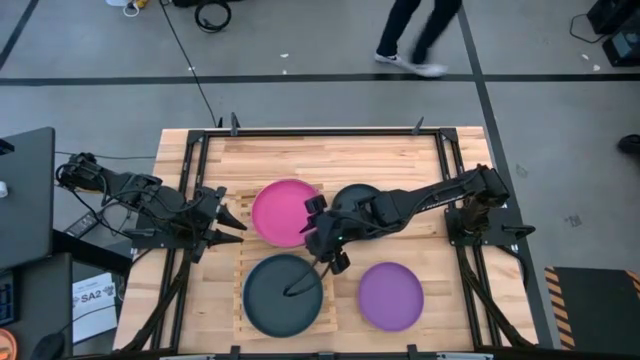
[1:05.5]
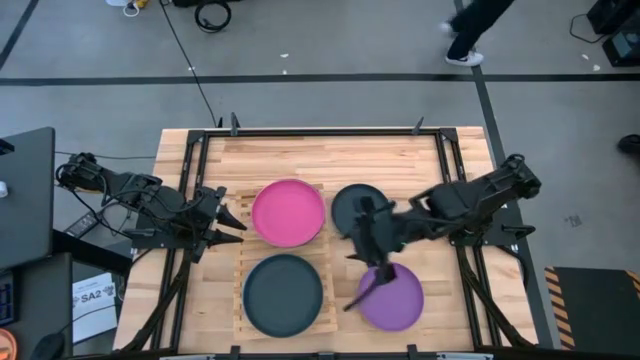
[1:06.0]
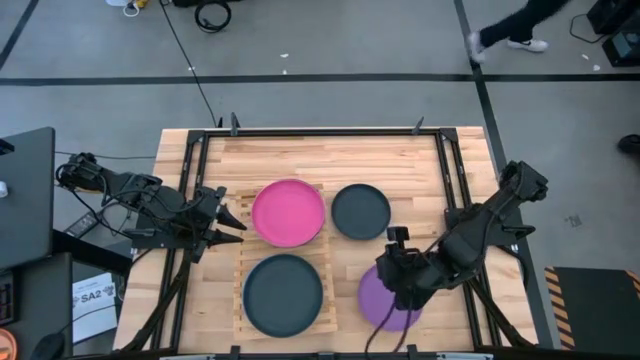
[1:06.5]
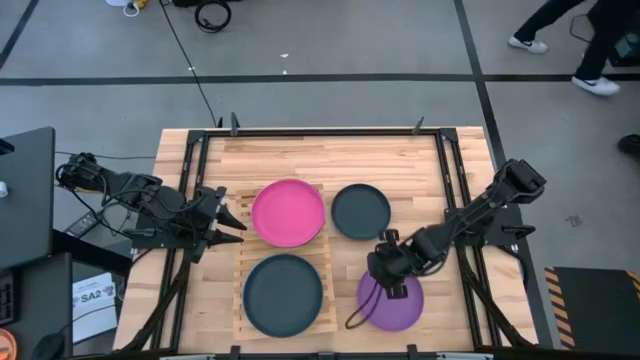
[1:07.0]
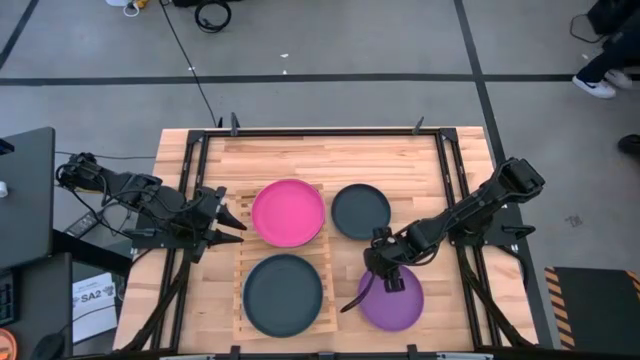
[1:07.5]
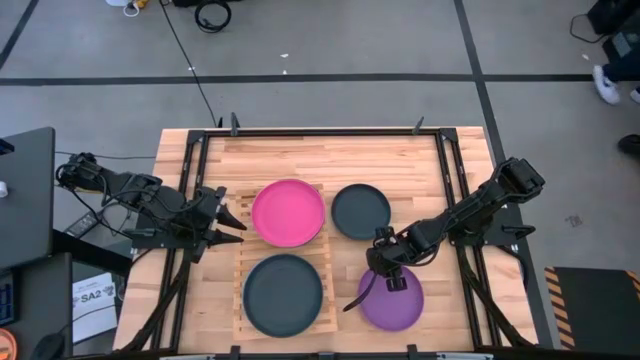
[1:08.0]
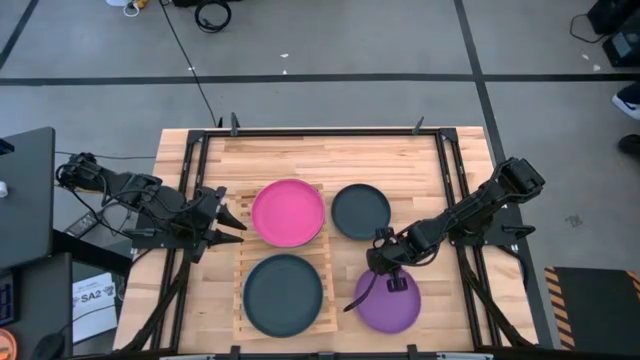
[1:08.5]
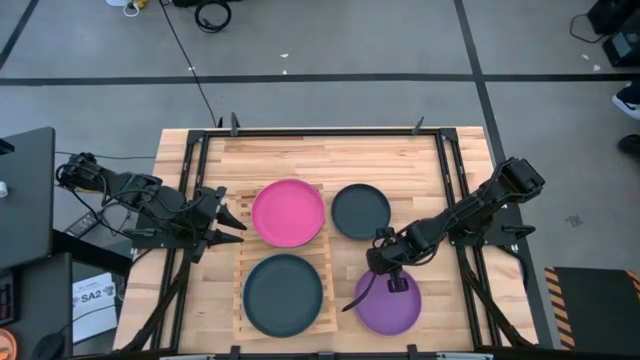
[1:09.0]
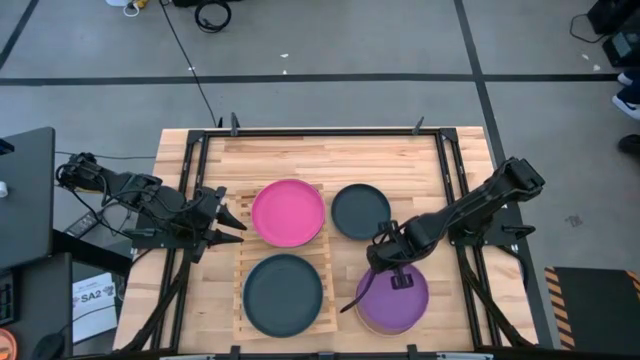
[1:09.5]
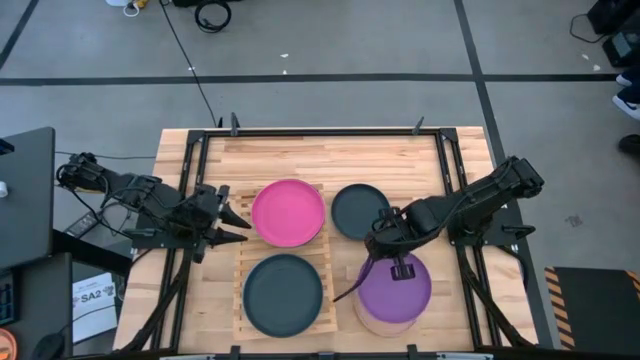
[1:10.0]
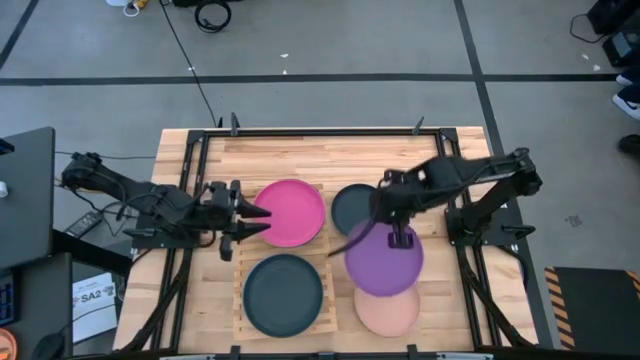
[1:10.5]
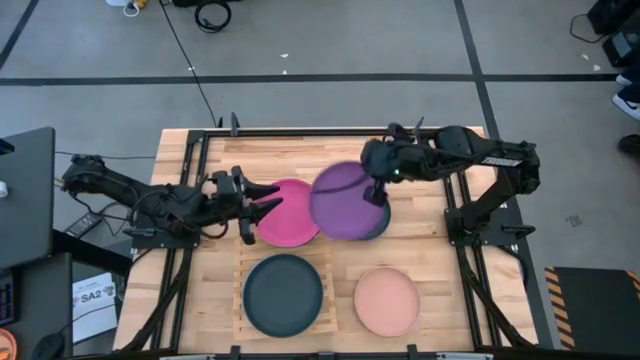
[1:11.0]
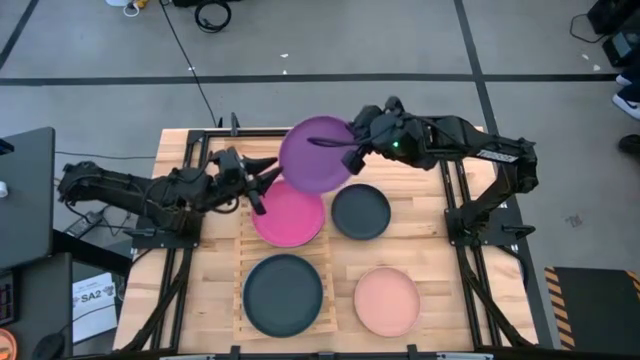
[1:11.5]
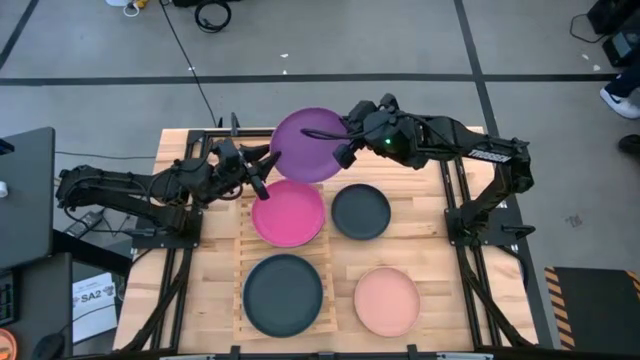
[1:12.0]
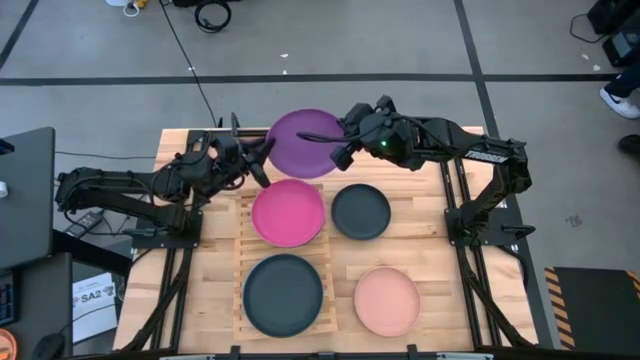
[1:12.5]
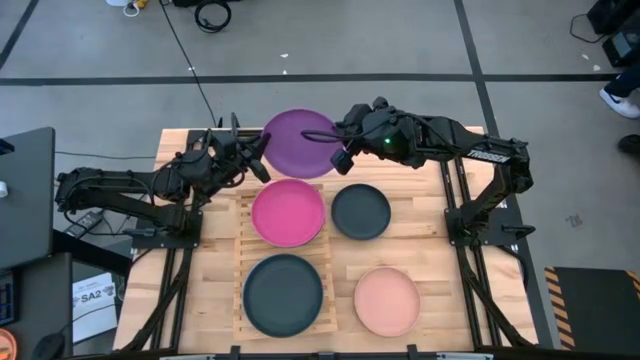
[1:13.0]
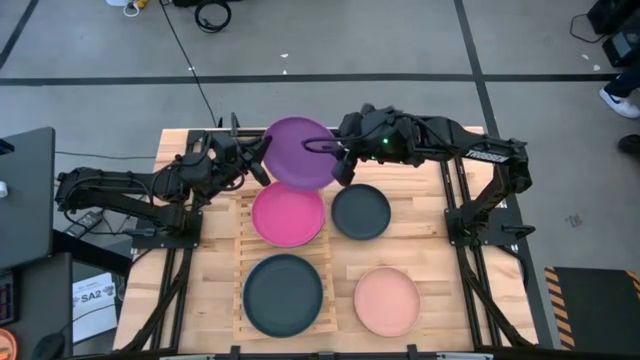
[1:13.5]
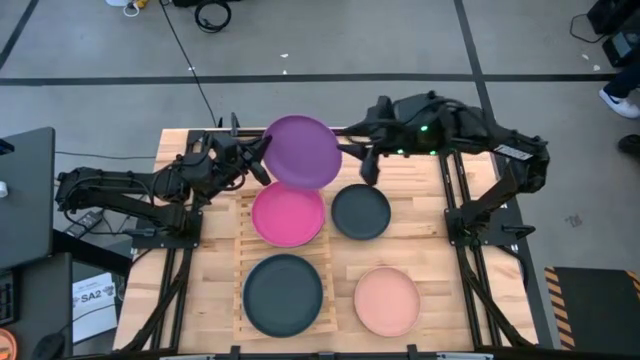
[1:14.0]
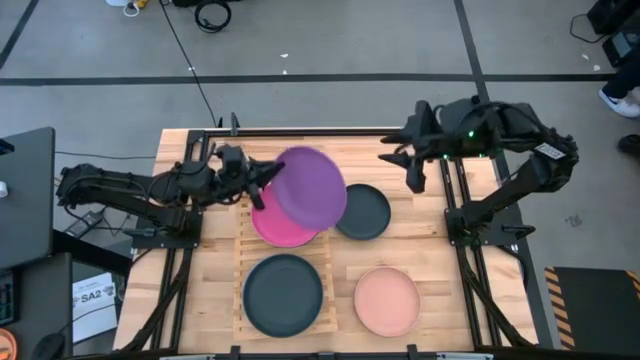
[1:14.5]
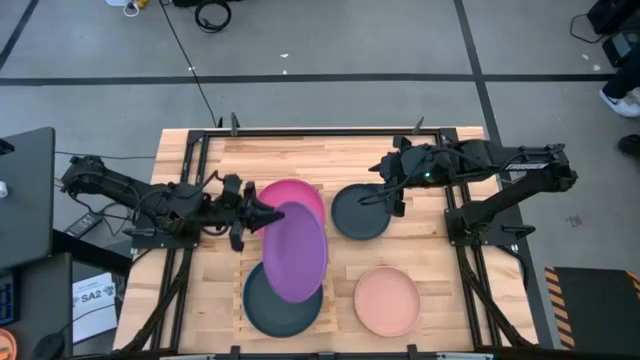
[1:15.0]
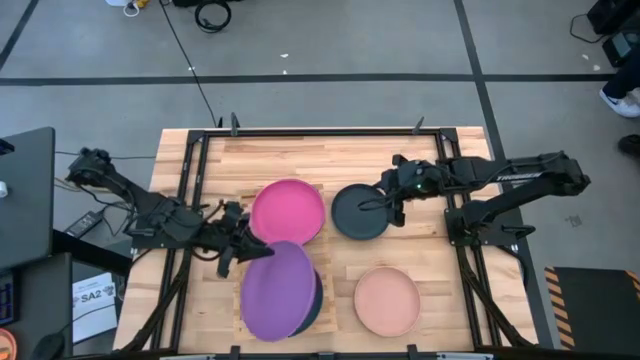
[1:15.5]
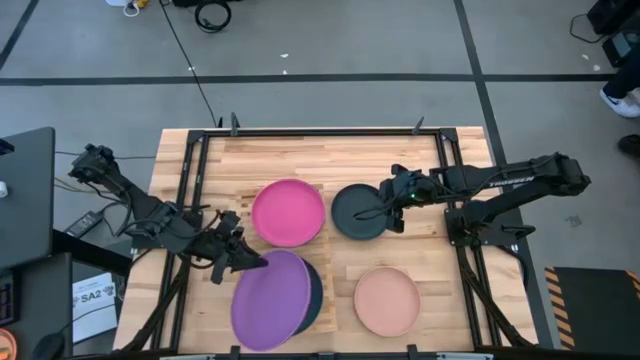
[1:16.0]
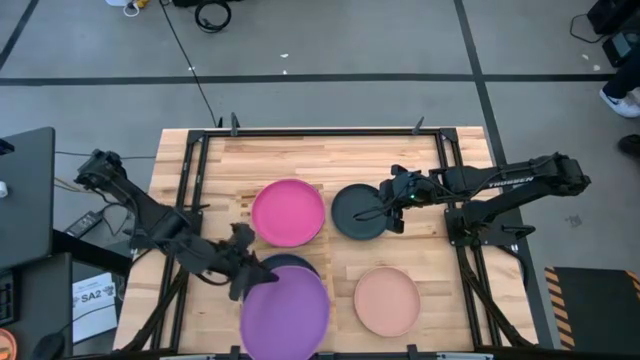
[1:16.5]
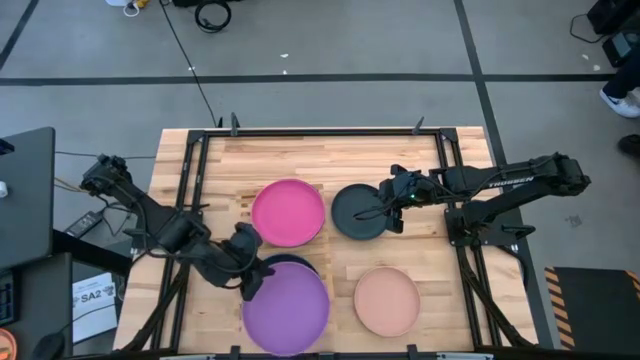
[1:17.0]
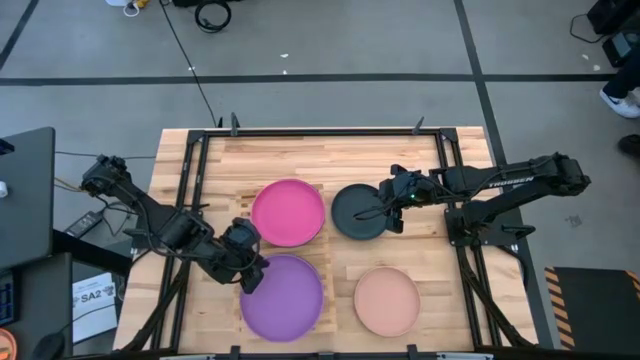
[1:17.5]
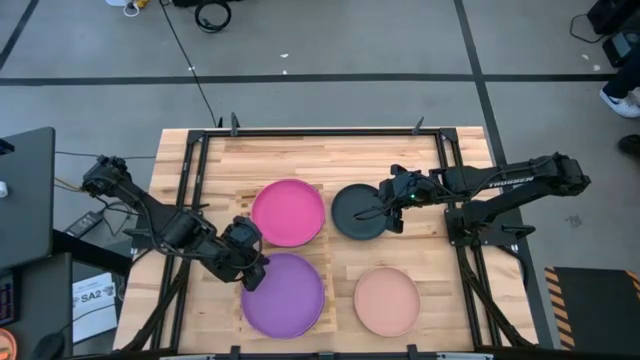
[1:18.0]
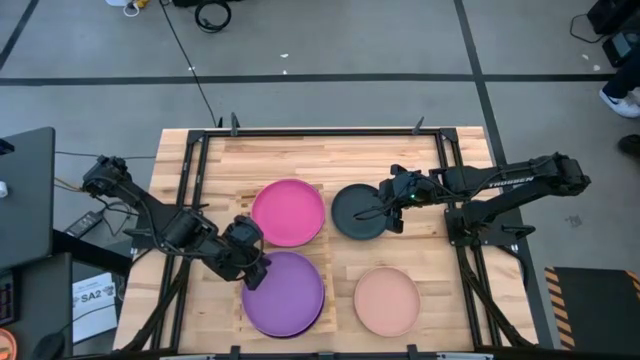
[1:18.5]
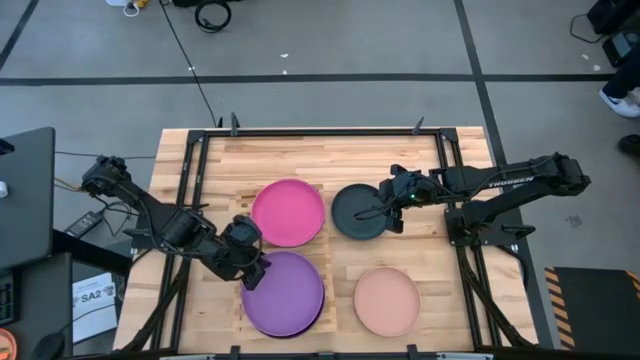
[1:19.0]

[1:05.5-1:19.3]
Task: Place and stack plates onto a shelf
Stack the violet plate on top of the black plate on the shelf

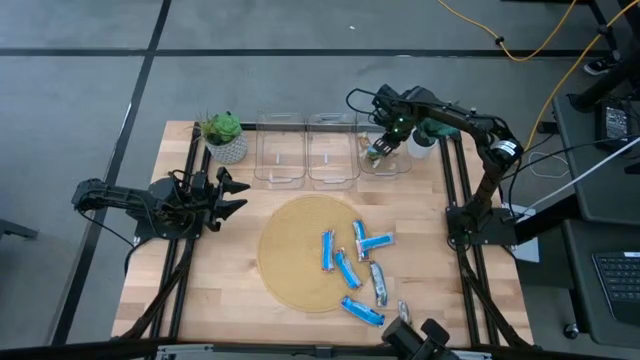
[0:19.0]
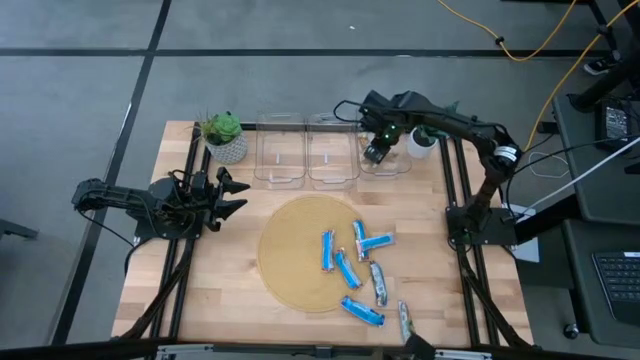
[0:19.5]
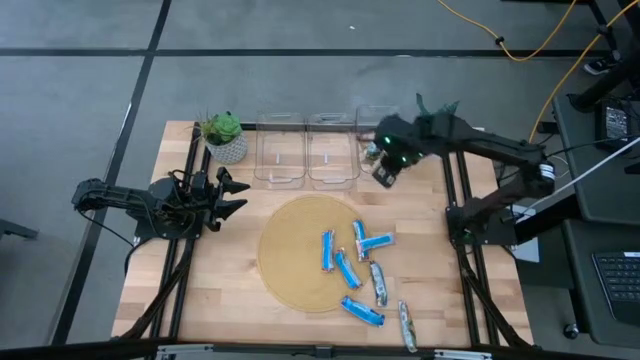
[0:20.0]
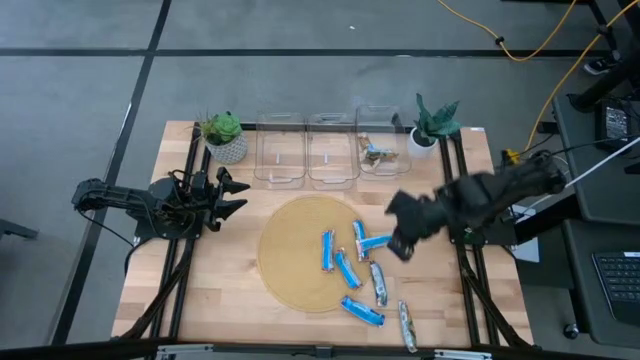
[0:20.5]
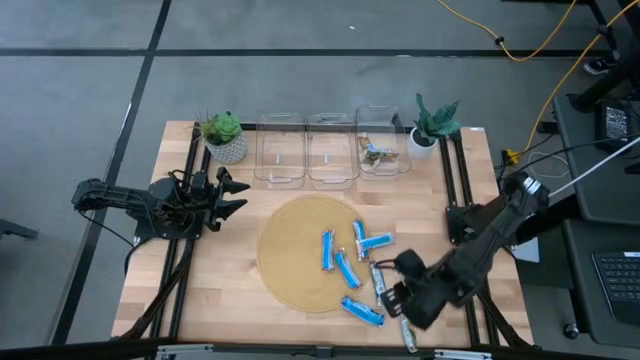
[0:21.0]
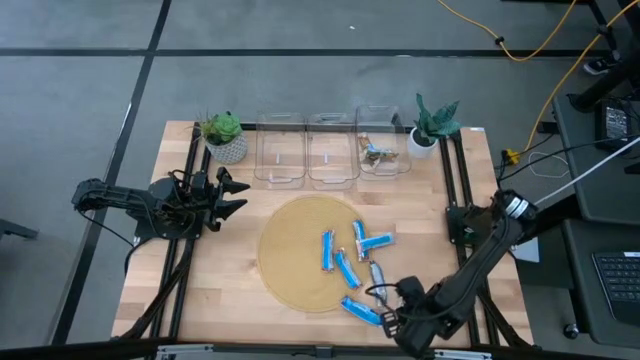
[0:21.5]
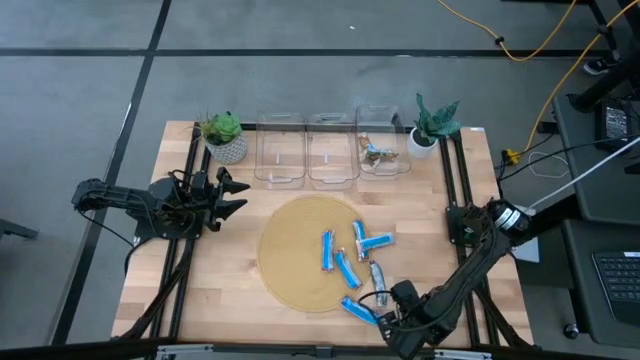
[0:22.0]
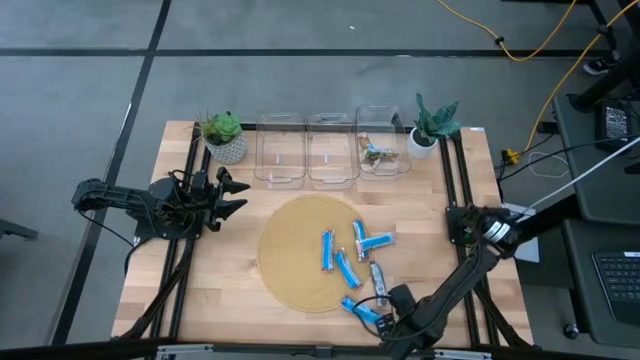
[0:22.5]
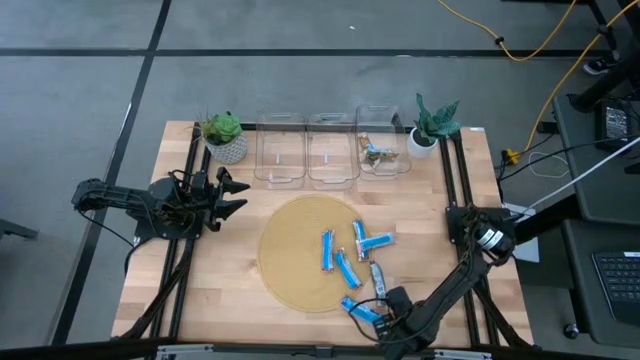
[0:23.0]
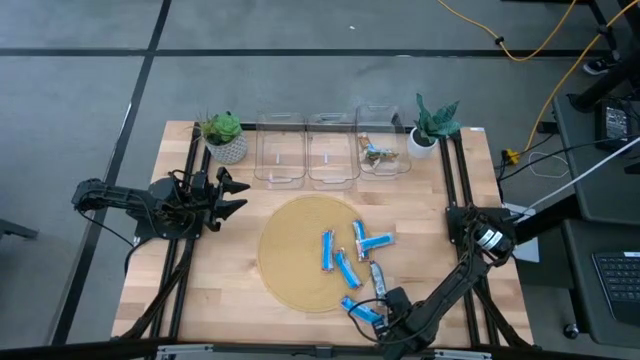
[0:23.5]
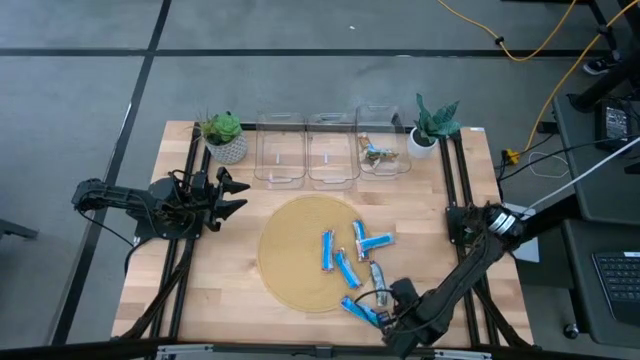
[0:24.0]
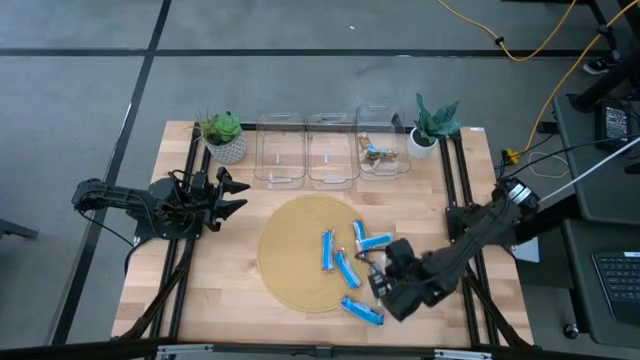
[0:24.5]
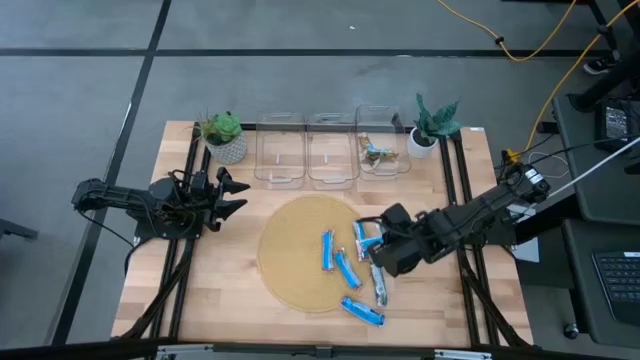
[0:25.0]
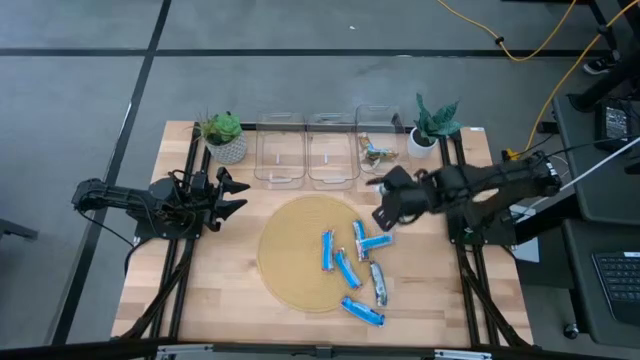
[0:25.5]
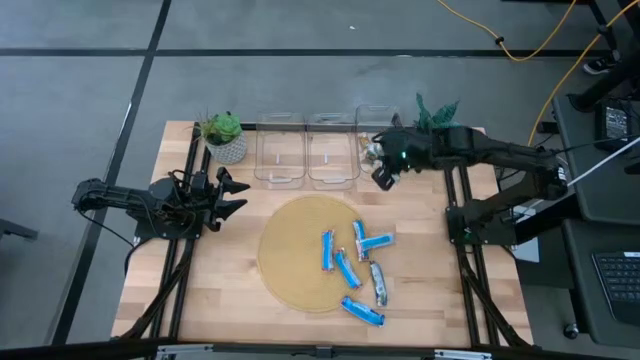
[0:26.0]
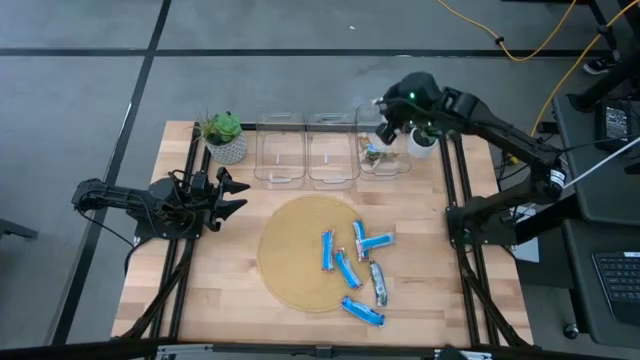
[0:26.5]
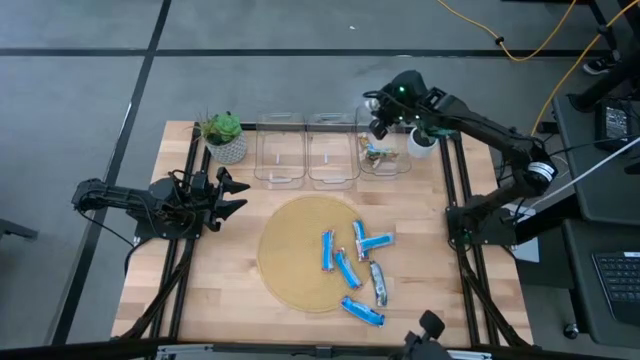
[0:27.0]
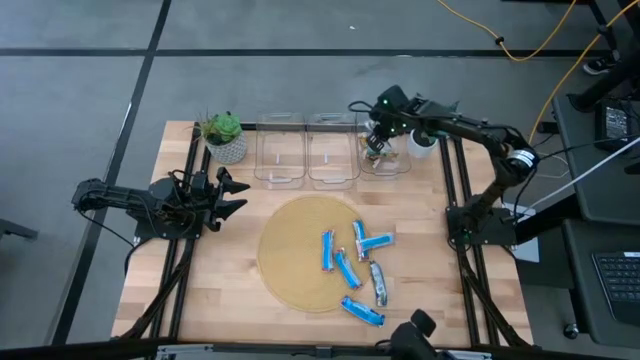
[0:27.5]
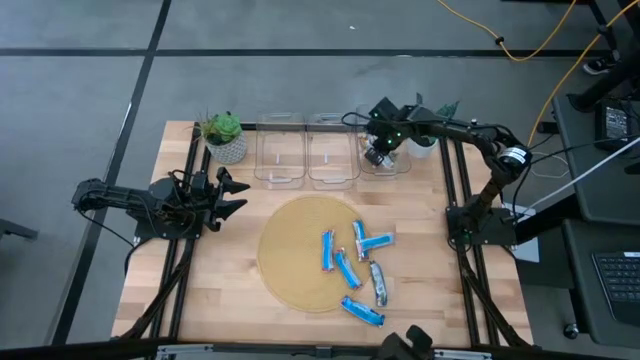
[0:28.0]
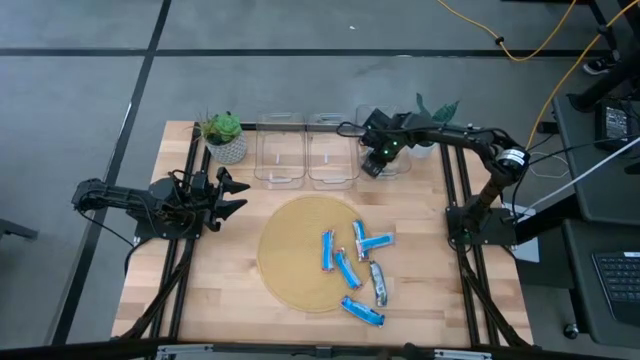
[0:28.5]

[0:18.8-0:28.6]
Task: Pick and place Granola Bars by type
Put the yellow granola bar into the right transparent bin
